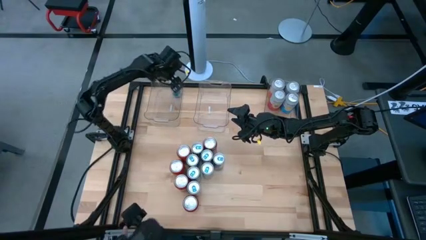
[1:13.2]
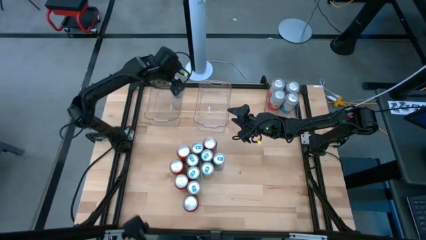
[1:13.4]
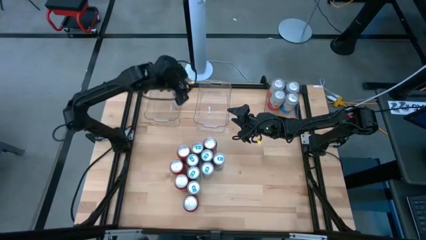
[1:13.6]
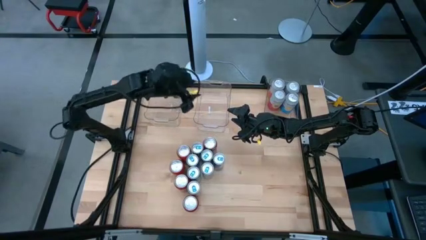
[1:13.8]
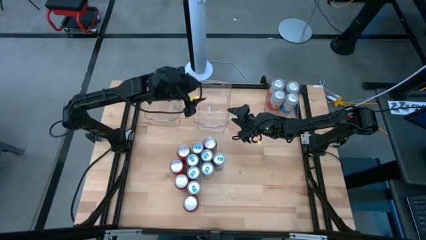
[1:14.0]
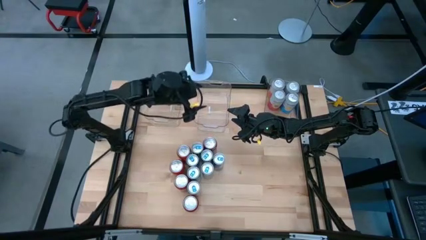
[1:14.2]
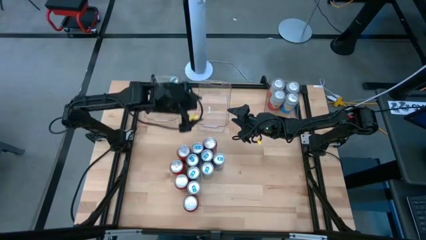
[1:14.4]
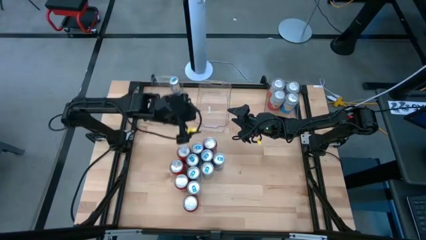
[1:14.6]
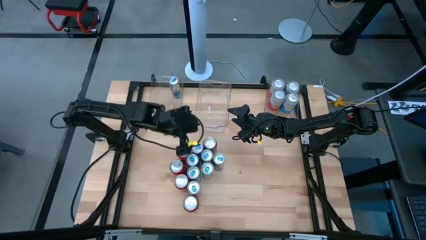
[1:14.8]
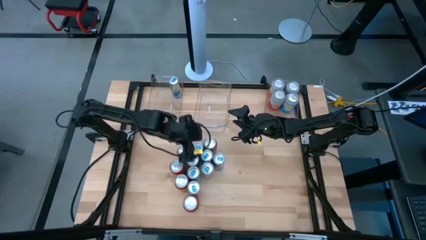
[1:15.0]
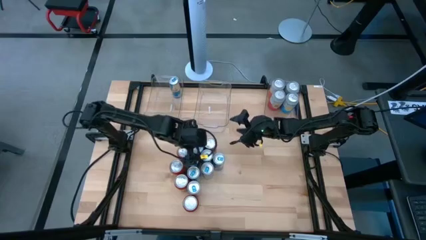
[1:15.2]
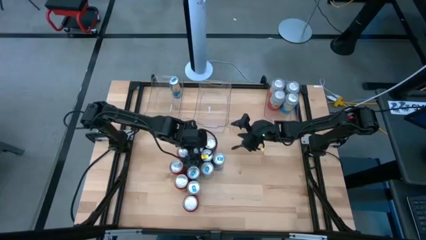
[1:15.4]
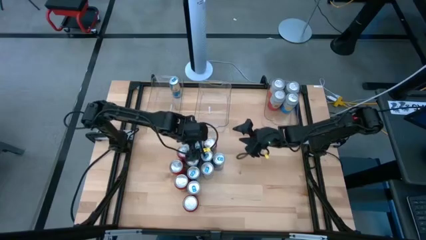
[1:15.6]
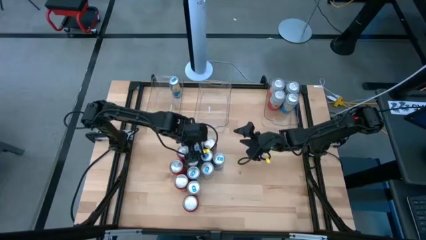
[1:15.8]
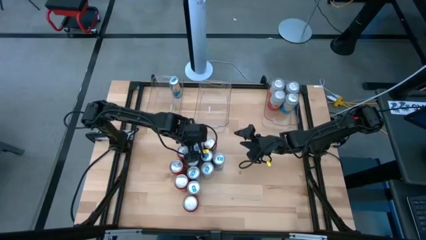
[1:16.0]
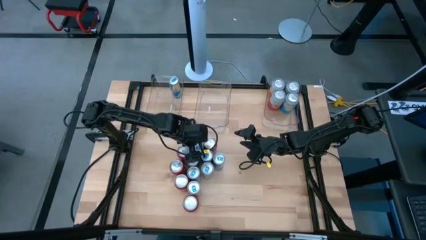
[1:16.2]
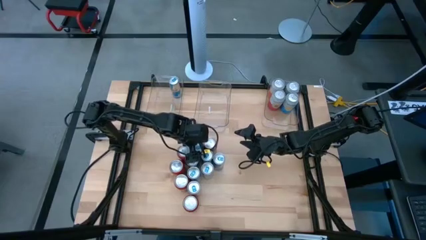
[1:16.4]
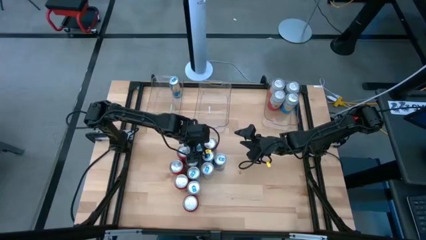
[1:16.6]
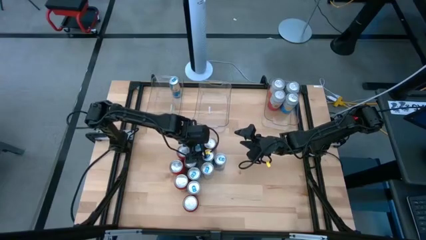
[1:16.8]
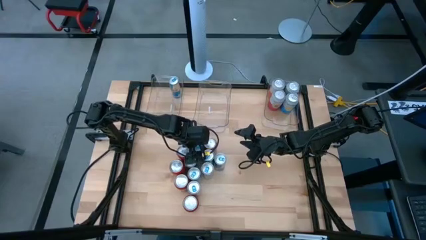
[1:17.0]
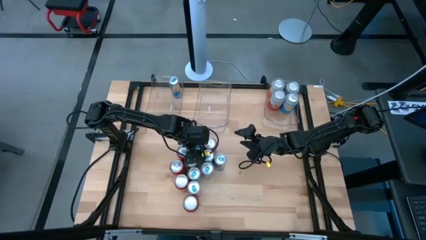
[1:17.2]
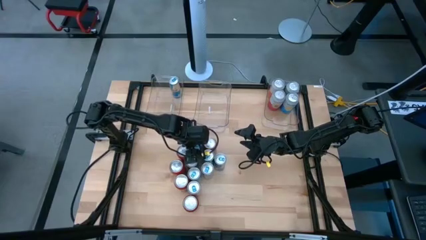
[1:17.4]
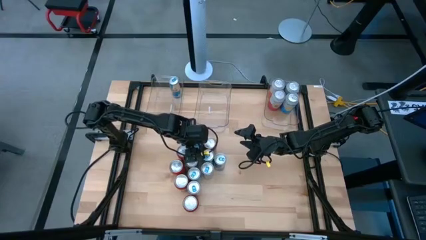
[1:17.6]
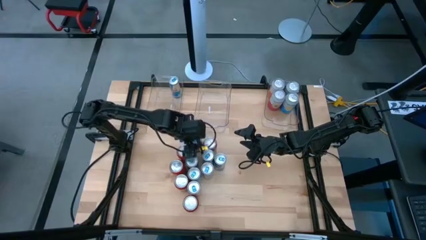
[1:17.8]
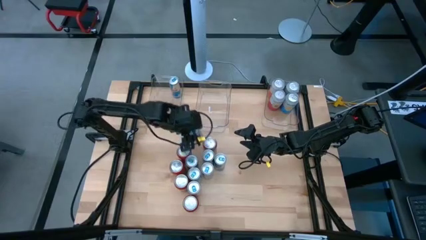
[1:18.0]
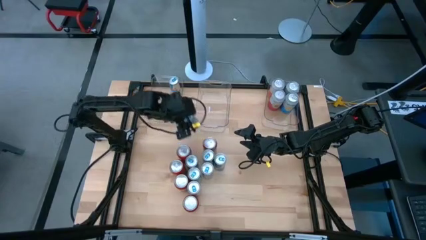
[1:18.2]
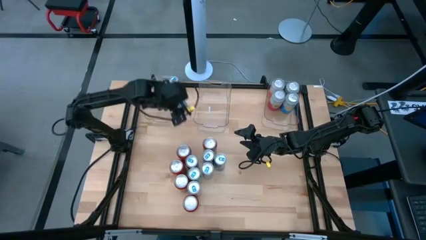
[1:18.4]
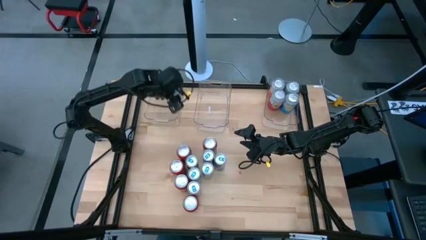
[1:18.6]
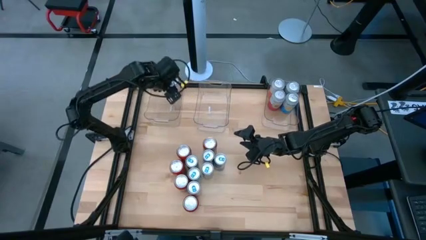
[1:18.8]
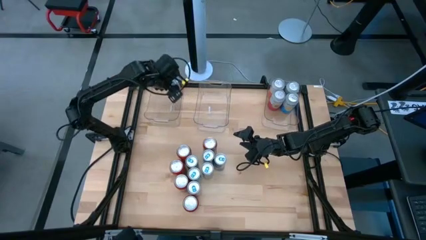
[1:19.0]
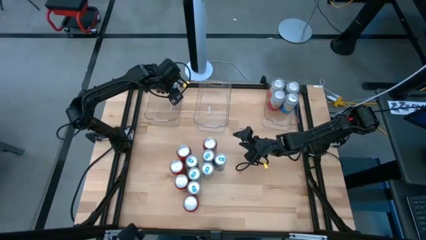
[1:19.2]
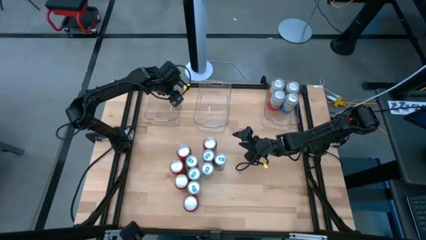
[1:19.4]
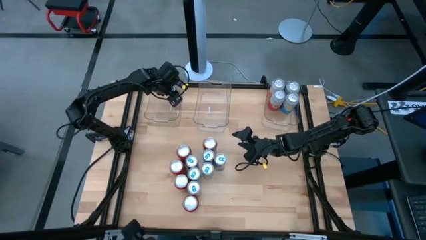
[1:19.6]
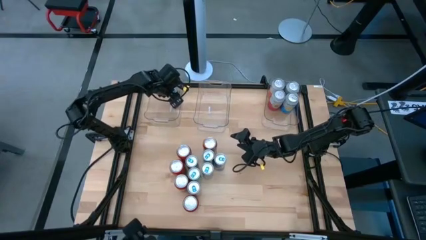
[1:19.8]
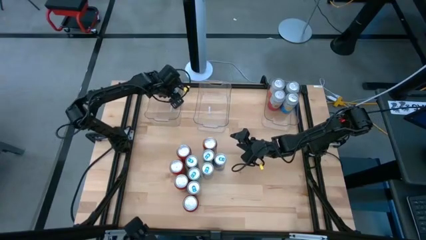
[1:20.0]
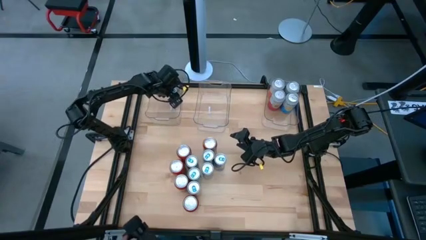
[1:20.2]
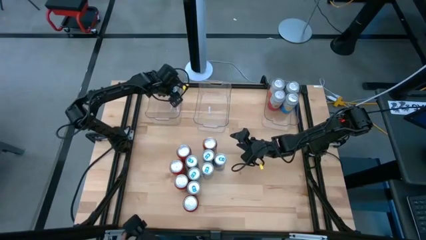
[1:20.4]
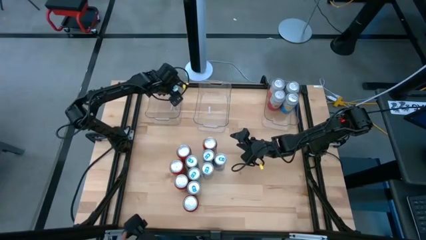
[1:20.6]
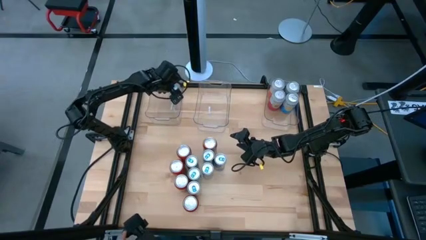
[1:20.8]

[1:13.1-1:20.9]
Task: Sort soda cans
Put the blue soda can into the left transparent bin

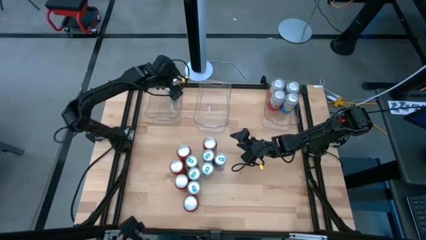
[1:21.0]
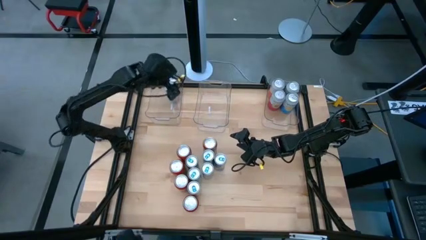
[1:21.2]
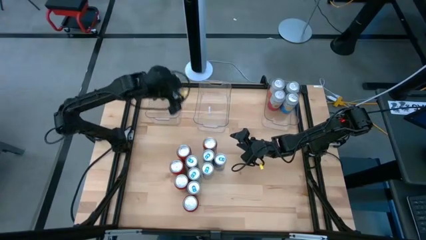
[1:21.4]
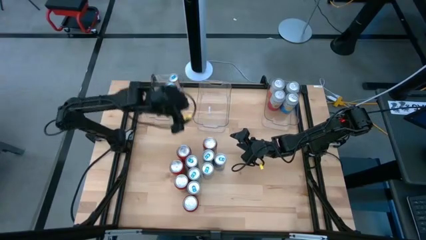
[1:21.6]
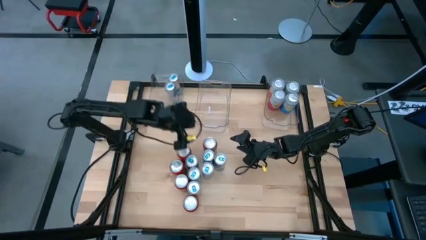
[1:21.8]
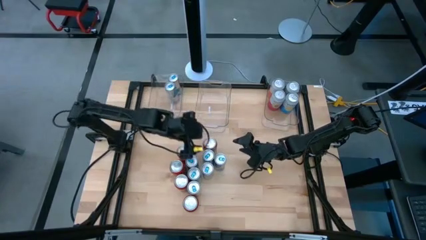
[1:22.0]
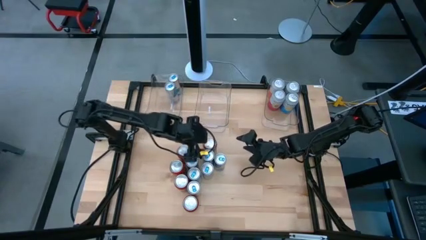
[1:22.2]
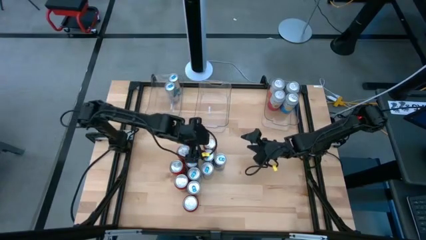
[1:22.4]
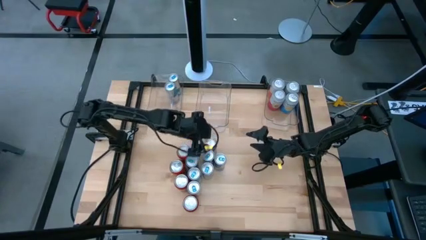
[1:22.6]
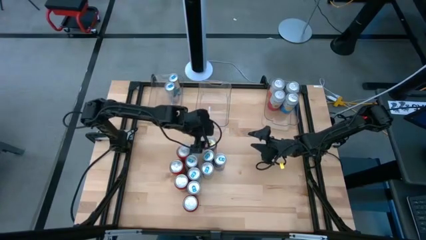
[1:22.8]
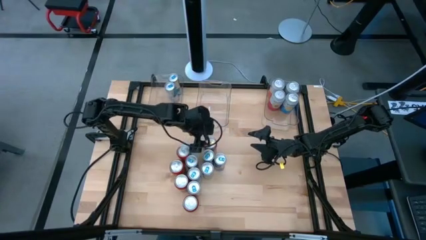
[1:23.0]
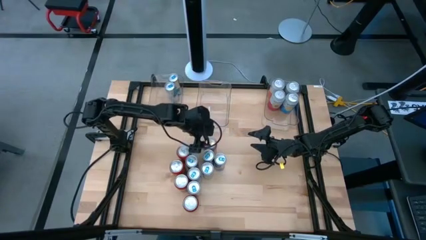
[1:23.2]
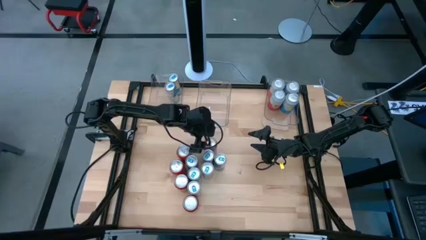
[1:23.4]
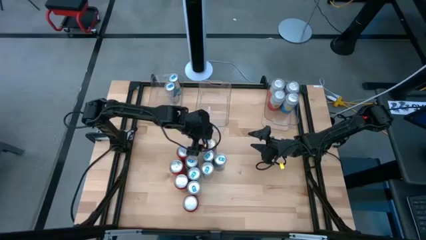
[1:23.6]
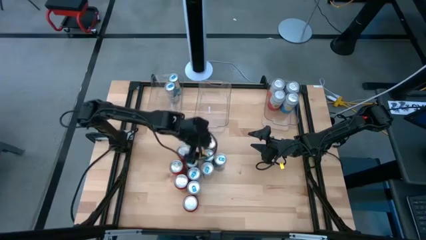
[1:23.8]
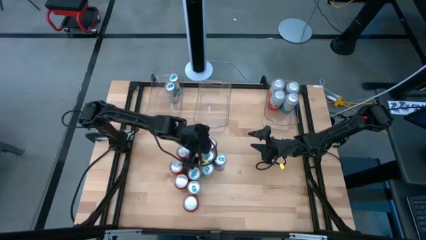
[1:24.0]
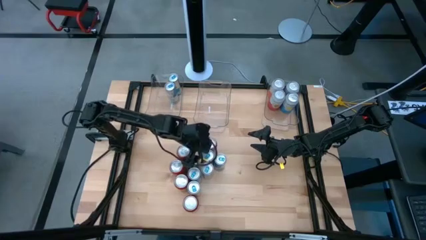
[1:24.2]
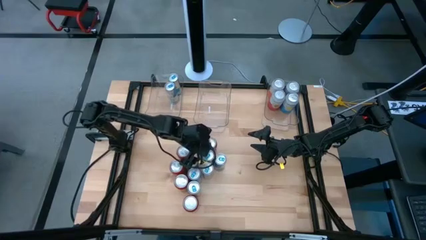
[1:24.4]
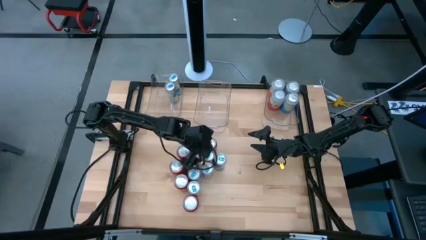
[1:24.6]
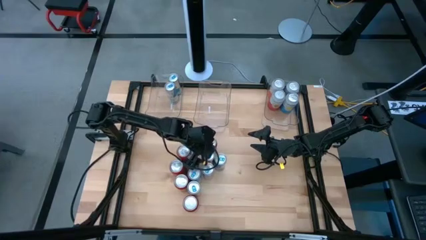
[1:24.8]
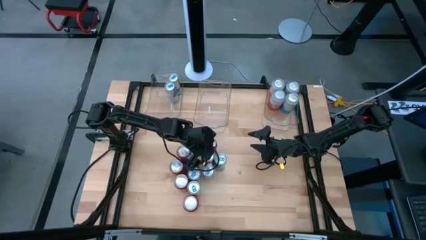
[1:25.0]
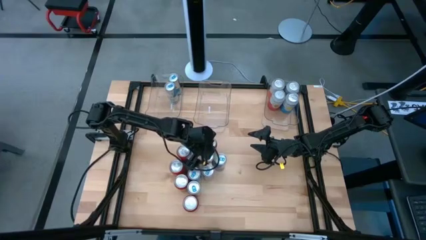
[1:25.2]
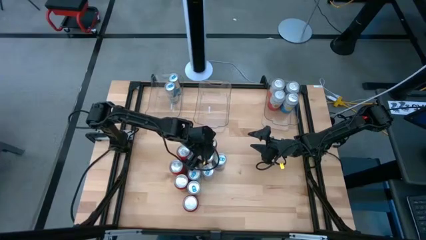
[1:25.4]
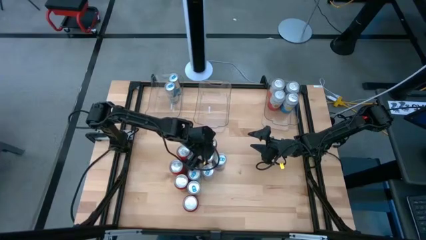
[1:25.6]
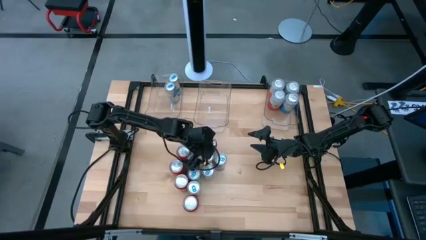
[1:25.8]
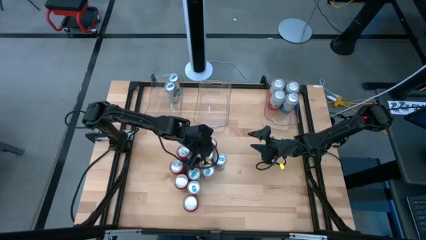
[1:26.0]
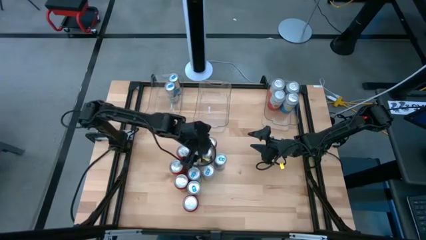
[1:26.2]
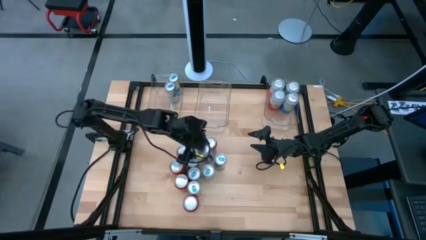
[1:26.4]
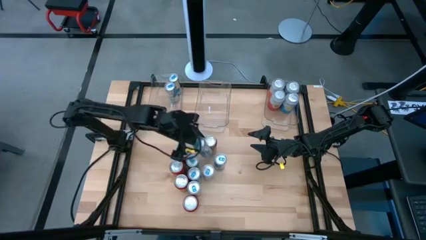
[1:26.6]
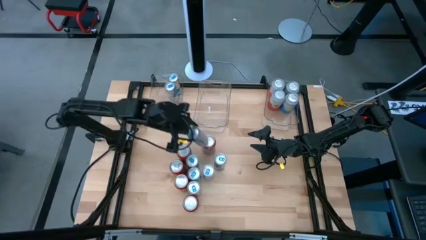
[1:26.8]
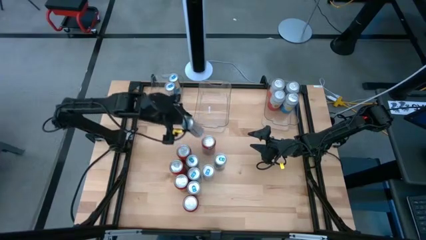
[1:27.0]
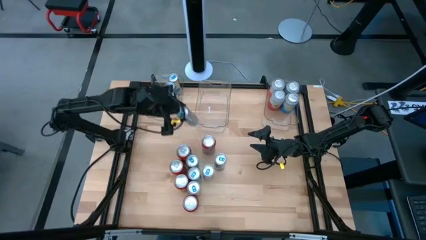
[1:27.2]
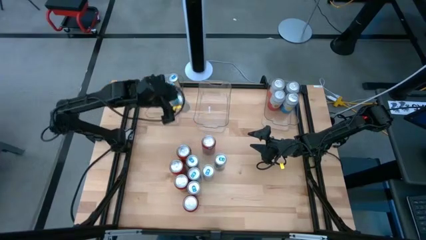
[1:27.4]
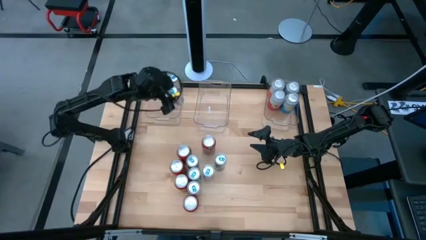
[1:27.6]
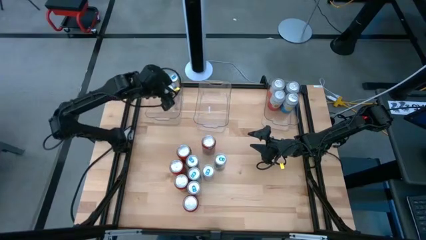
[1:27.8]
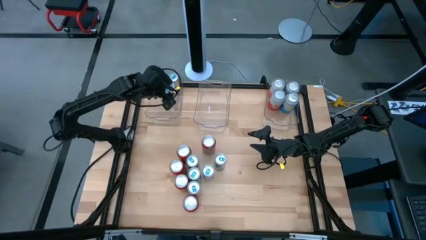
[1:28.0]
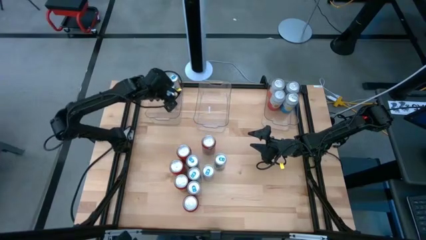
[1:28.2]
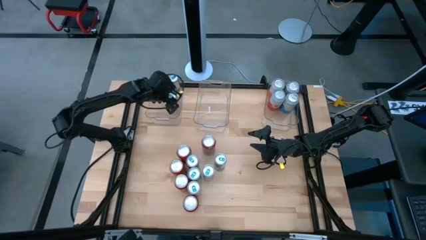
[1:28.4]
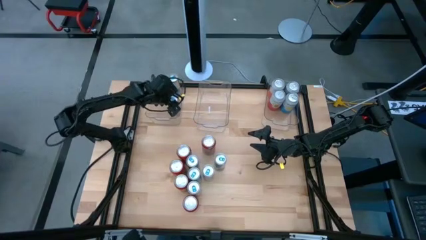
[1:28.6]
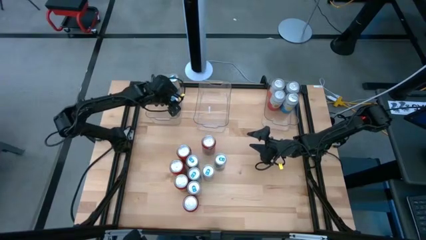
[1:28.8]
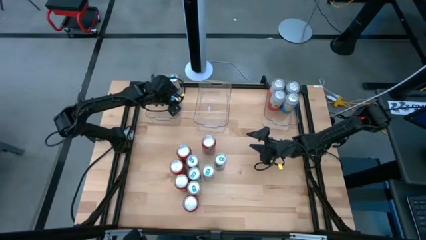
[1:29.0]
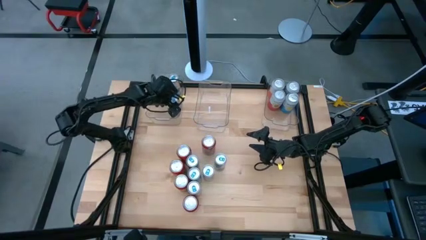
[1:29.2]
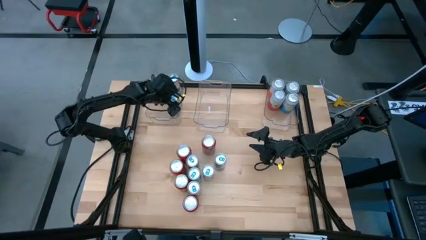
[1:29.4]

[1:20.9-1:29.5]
Put the blue soda can into the left transparent bin
